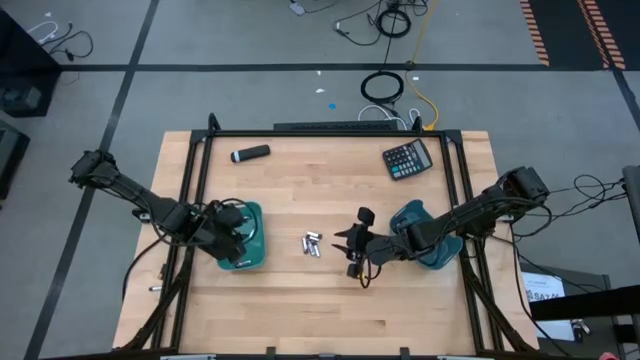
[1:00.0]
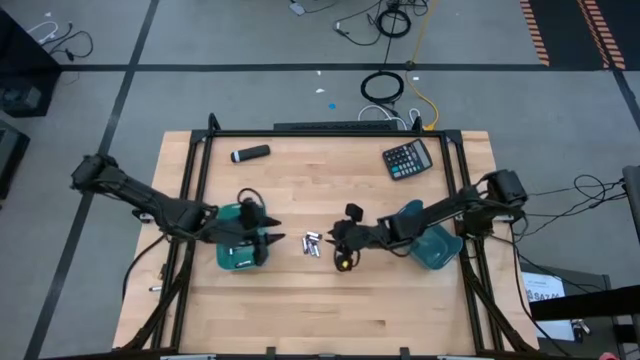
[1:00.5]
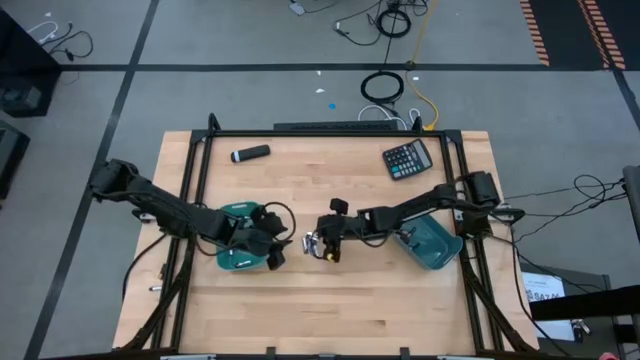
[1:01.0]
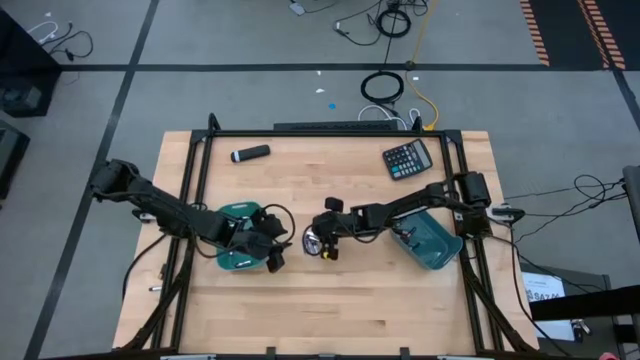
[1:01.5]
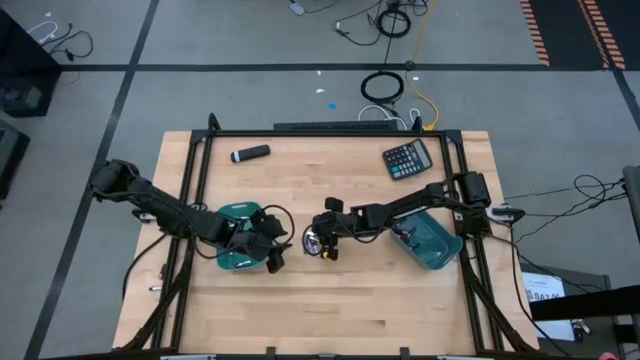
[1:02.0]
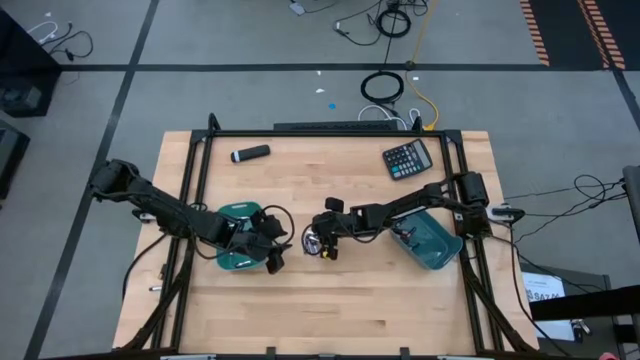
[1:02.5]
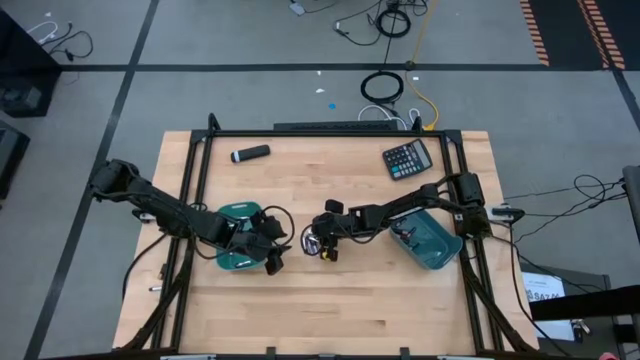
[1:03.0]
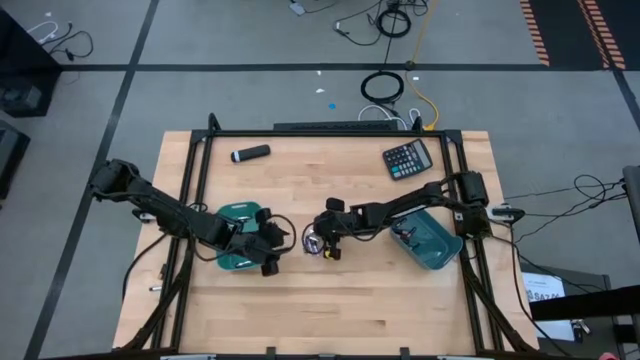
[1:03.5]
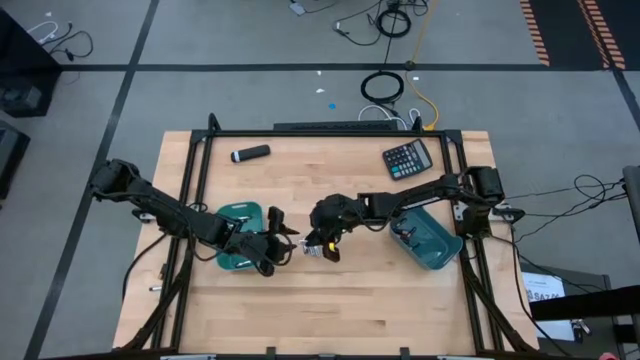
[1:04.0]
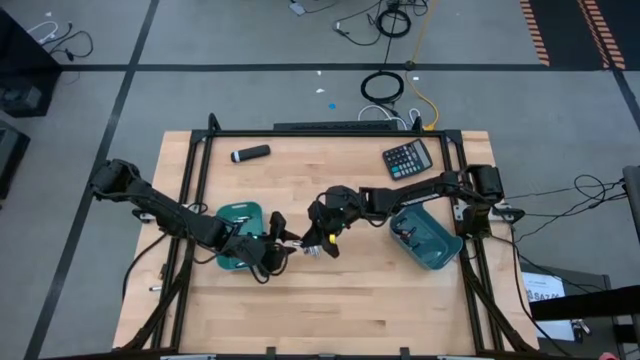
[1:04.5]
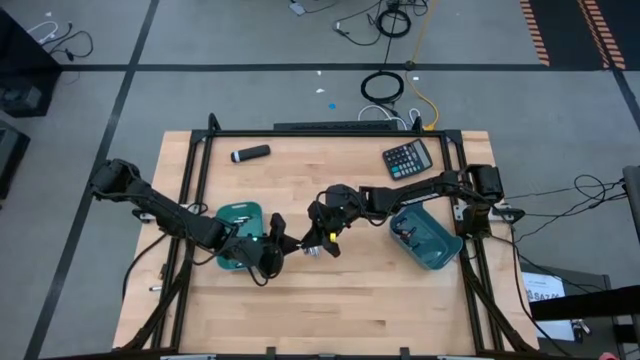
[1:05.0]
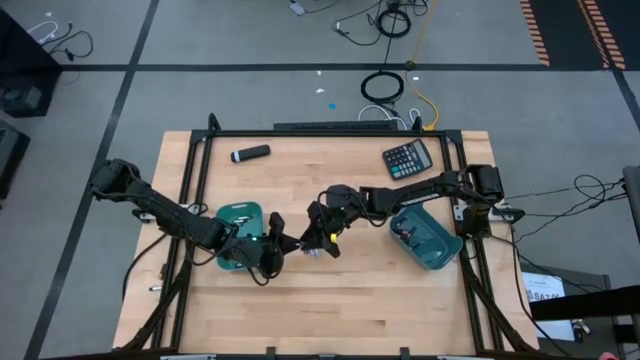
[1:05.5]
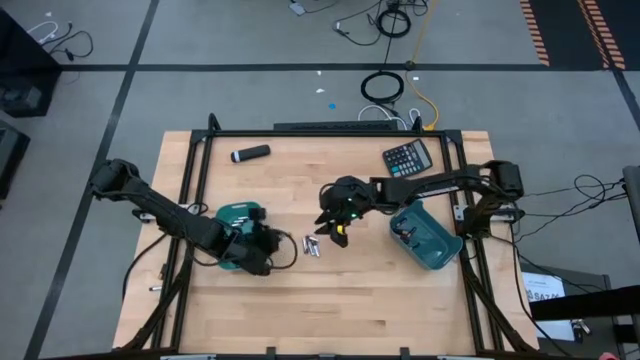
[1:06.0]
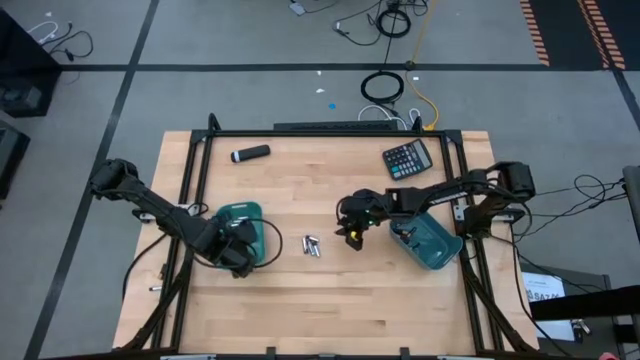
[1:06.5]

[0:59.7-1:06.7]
Task: Sort batteries
Put the silver battery into the light blue bin

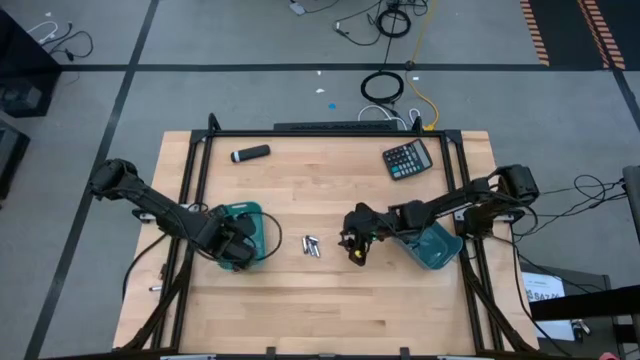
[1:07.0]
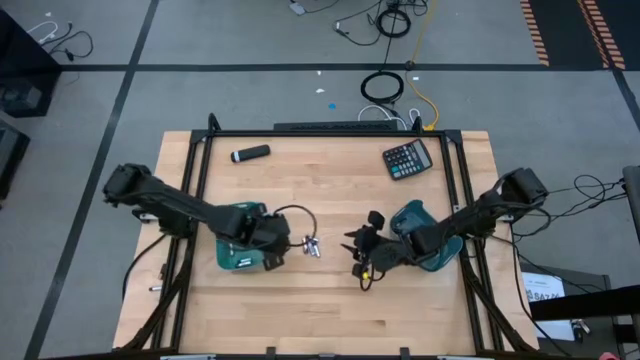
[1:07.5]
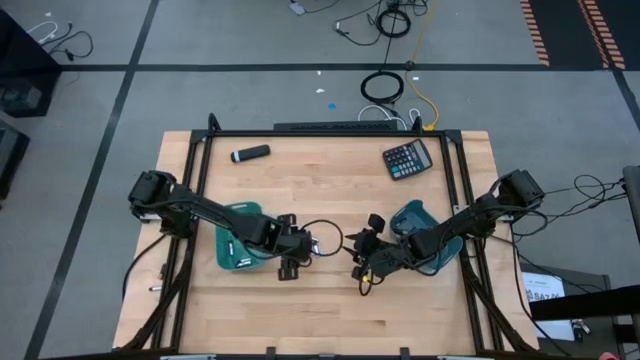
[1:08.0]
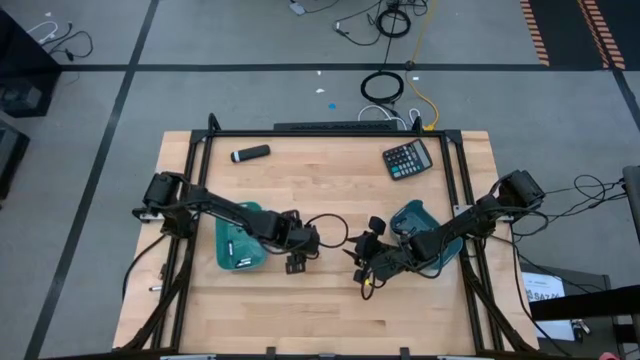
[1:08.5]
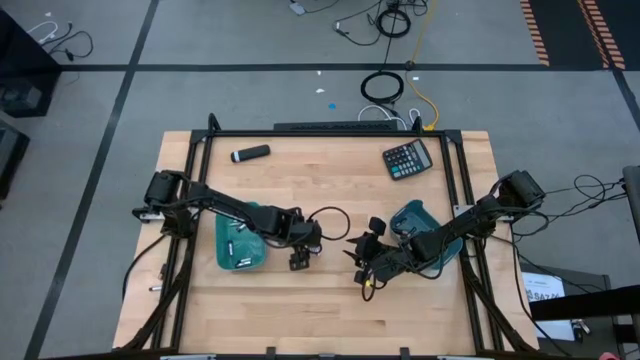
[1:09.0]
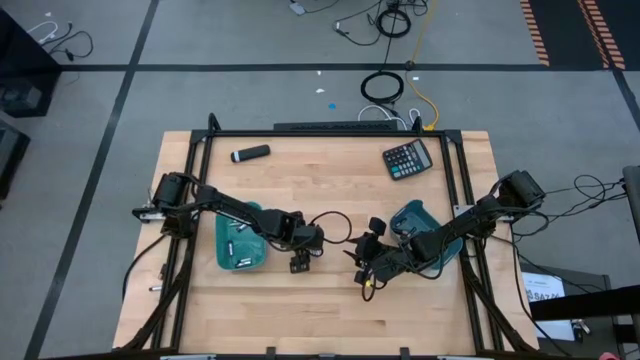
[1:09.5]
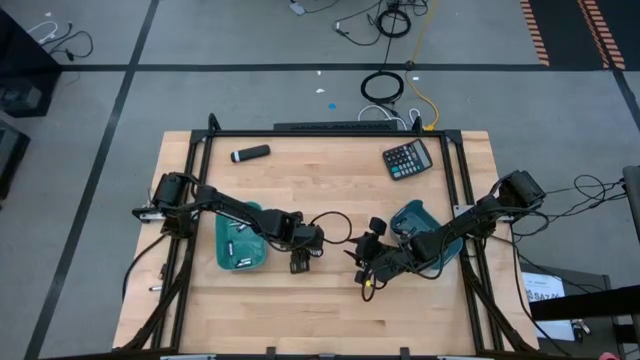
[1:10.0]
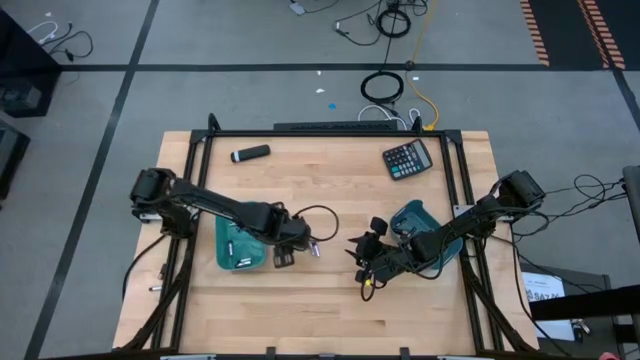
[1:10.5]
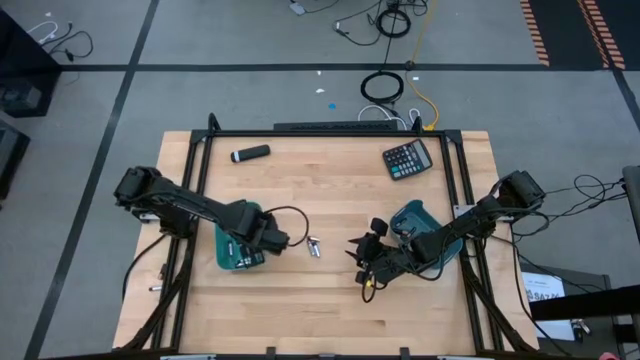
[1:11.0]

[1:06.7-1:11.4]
Put the silver battery into the light blue bin

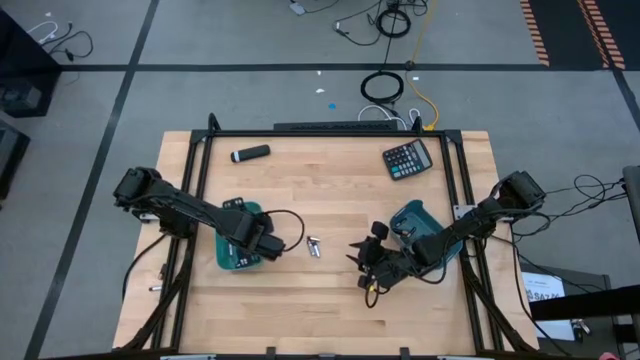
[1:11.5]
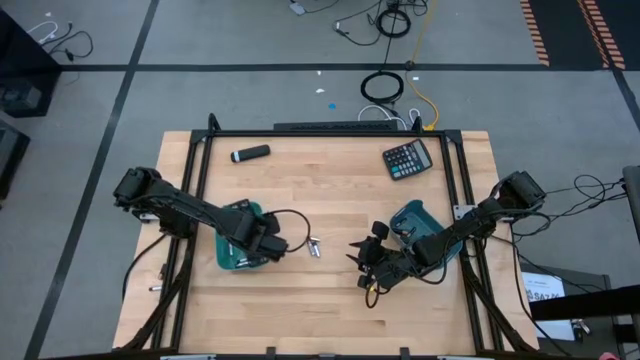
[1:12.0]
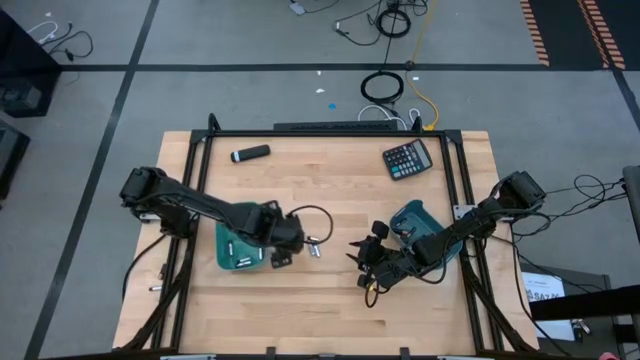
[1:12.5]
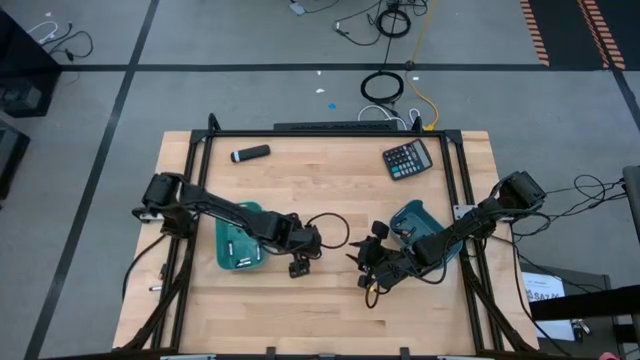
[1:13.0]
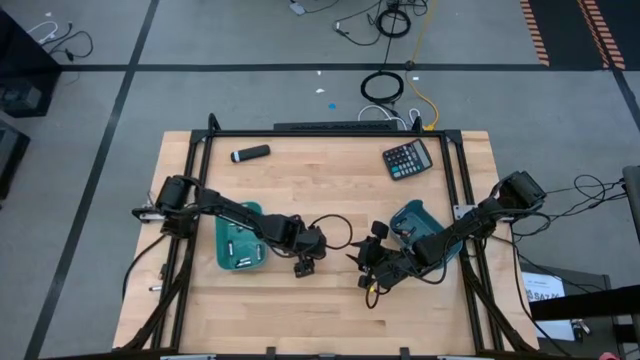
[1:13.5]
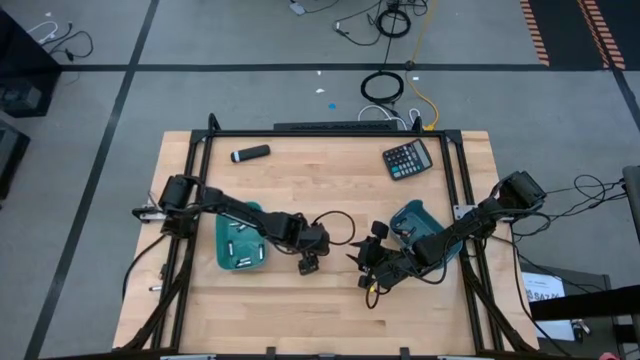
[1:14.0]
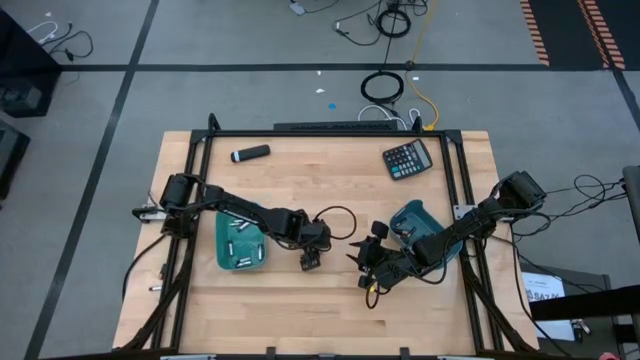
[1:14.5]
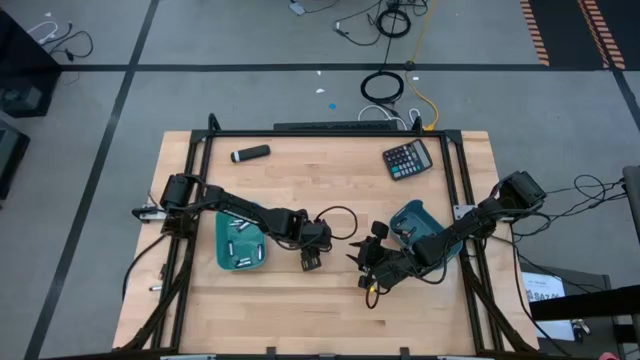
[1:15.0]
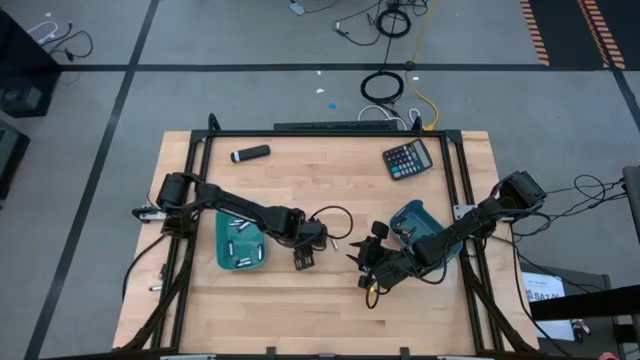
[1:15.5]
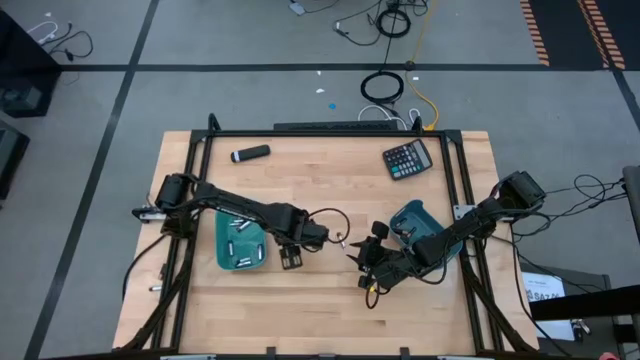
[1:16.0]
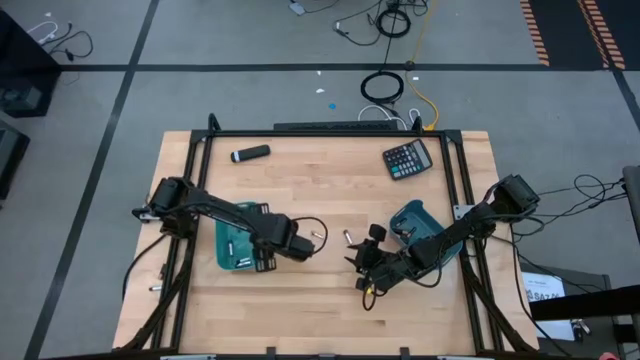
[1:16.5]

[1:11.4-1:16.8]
Put the silver battery into the light blue bin

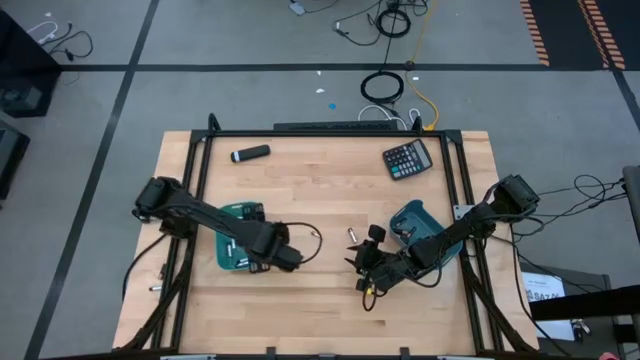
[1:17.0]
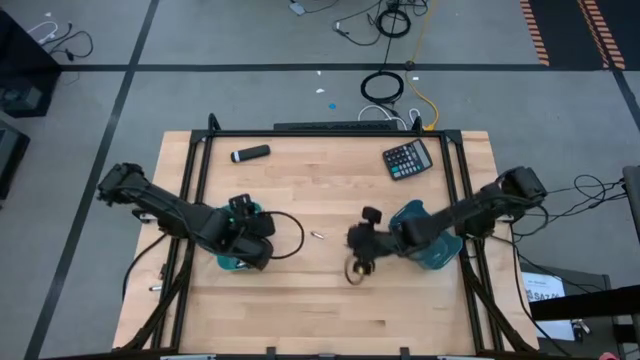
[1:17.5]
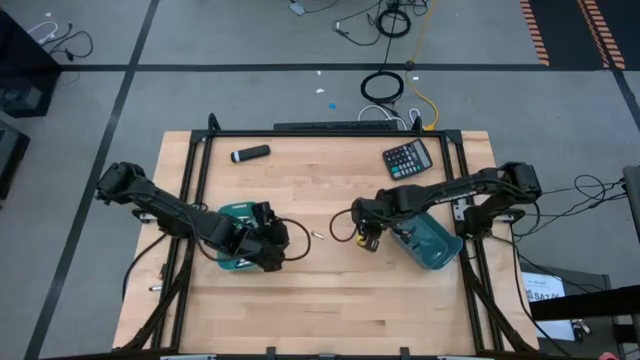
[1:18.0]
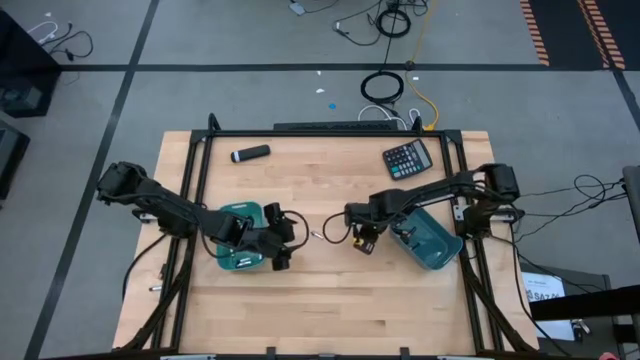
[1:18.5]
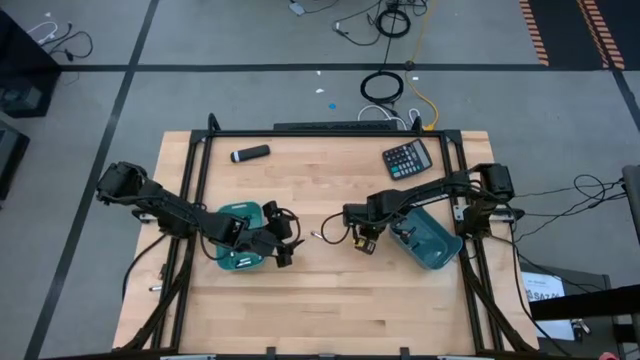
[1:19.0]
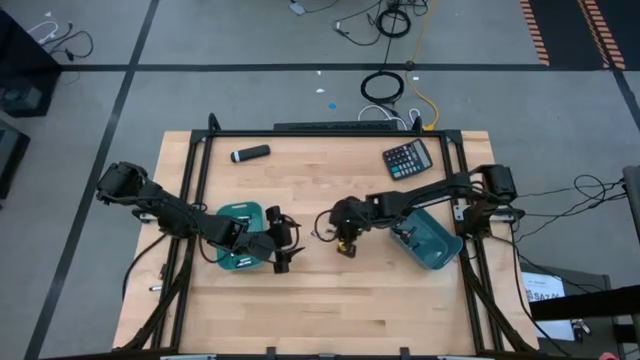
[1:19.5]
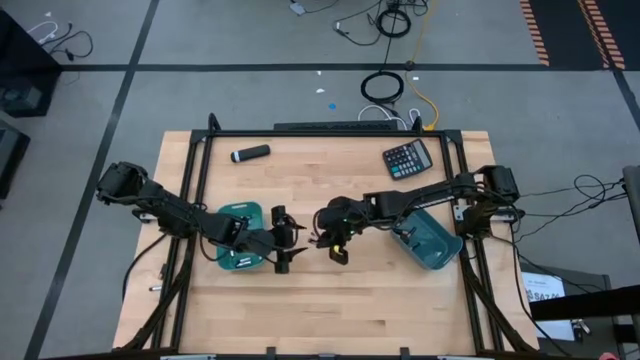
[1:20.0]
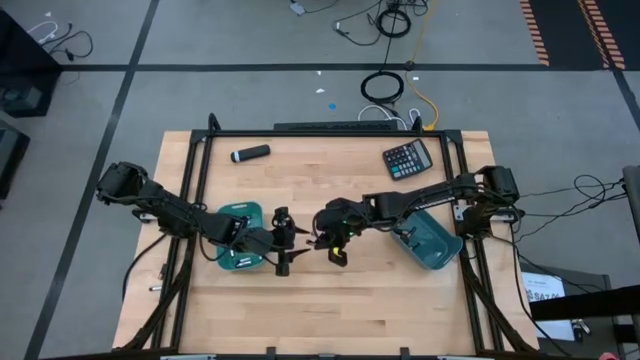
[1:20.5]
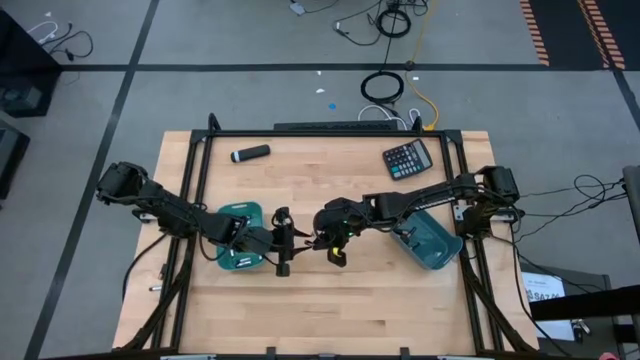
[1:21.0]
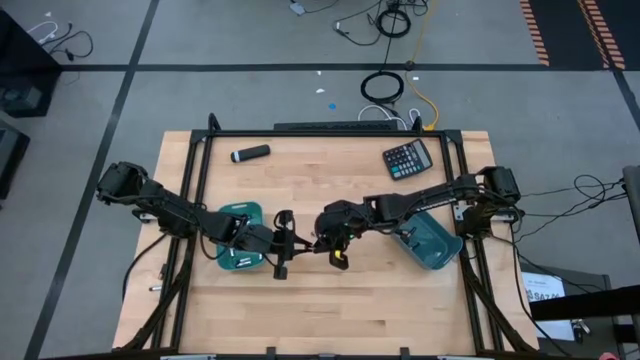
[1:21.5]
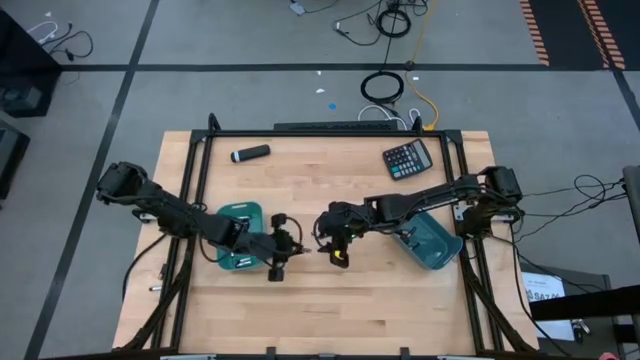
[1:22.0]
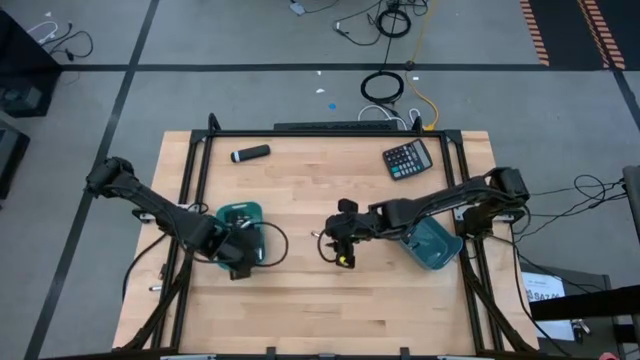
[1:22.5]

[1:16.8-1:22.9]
Put the silver battery into the light blue bin
